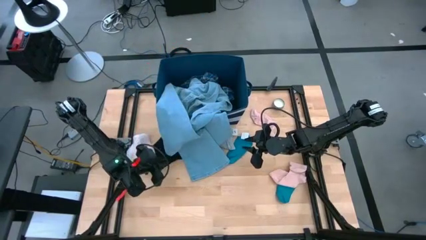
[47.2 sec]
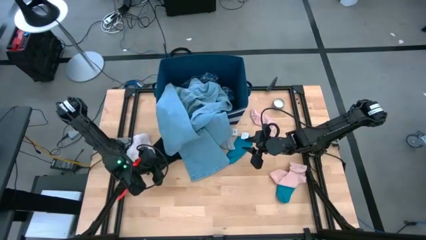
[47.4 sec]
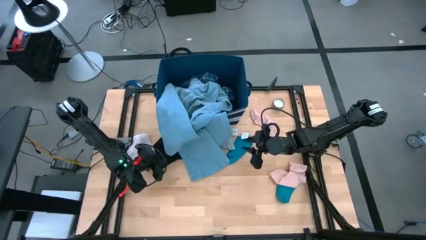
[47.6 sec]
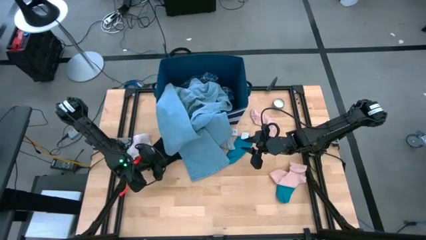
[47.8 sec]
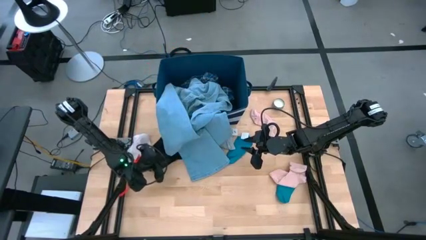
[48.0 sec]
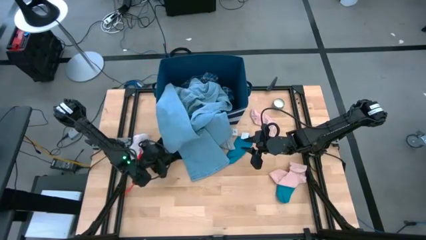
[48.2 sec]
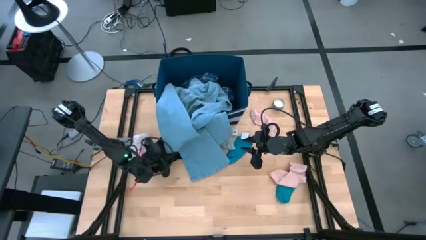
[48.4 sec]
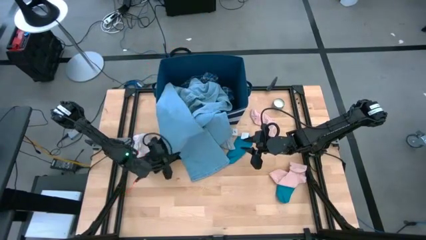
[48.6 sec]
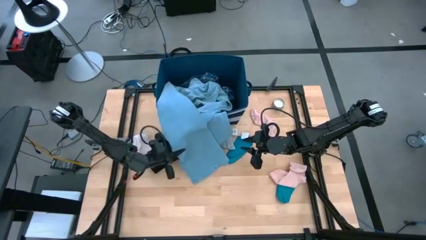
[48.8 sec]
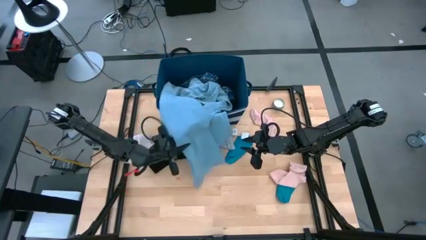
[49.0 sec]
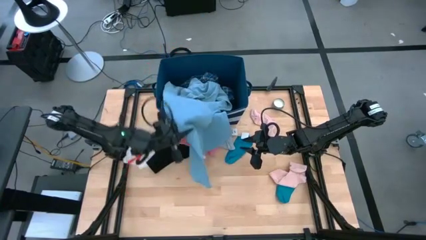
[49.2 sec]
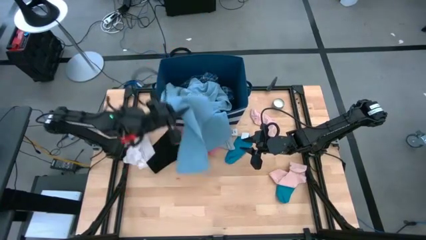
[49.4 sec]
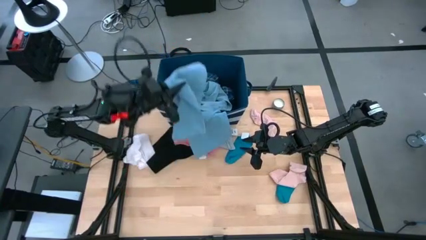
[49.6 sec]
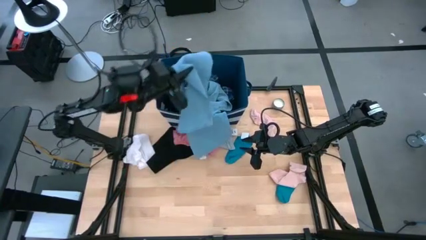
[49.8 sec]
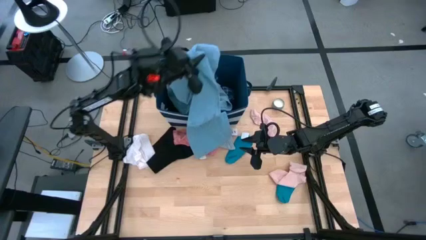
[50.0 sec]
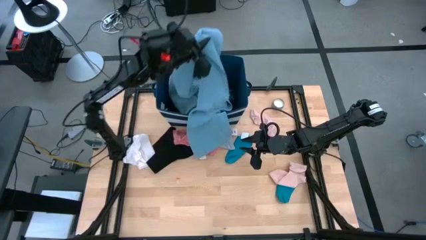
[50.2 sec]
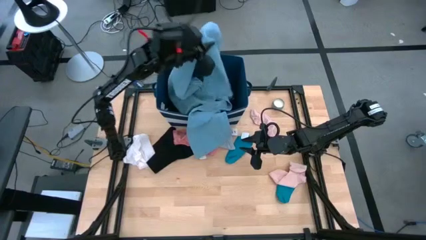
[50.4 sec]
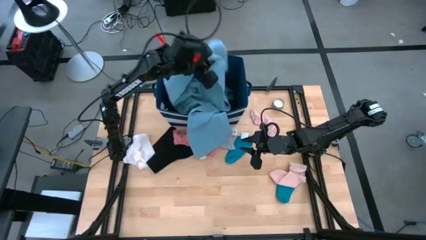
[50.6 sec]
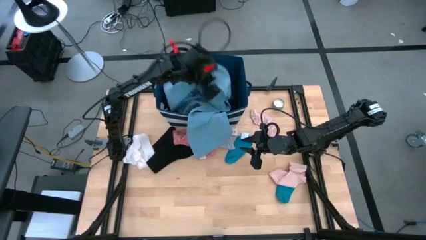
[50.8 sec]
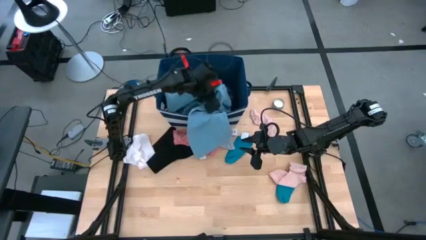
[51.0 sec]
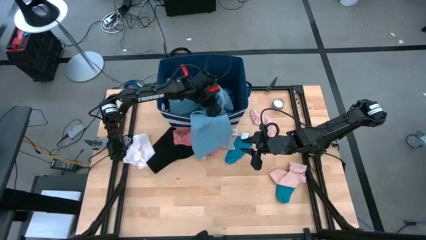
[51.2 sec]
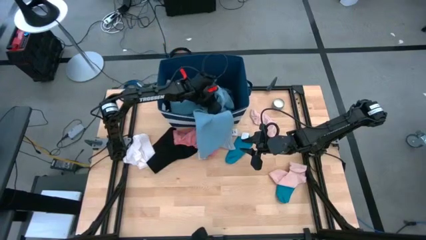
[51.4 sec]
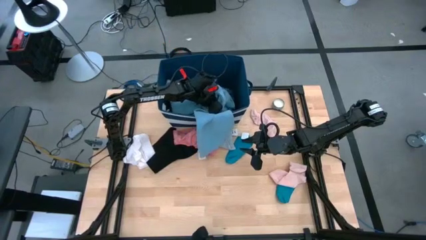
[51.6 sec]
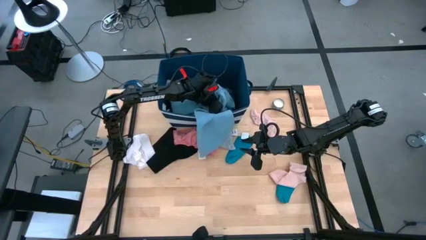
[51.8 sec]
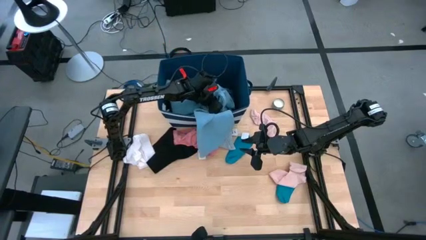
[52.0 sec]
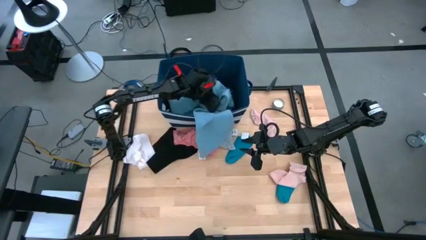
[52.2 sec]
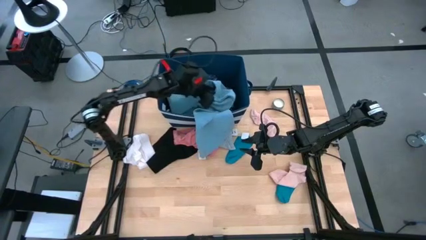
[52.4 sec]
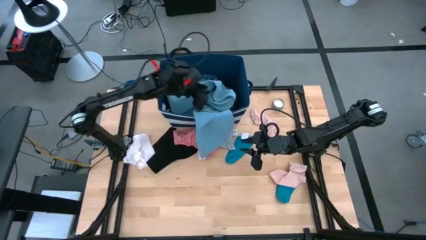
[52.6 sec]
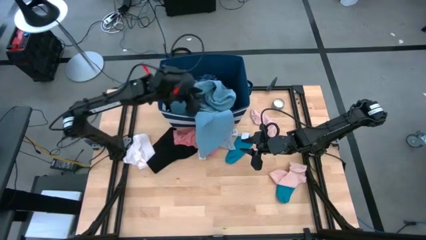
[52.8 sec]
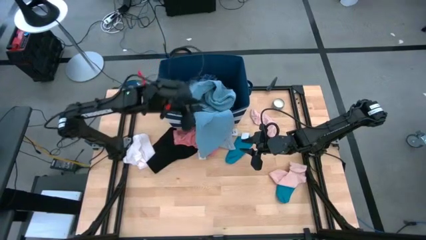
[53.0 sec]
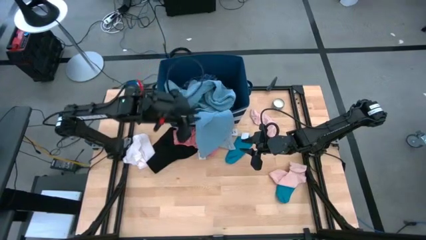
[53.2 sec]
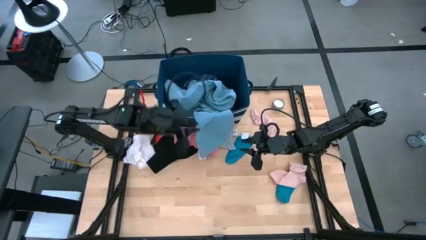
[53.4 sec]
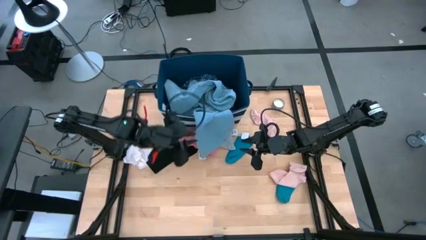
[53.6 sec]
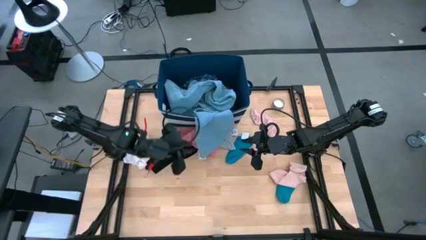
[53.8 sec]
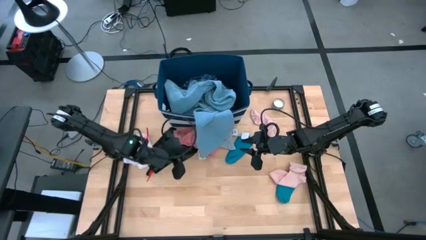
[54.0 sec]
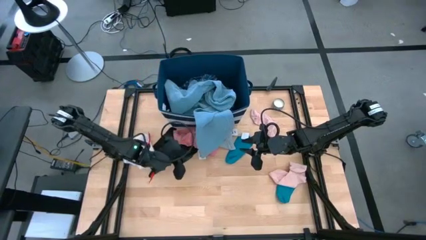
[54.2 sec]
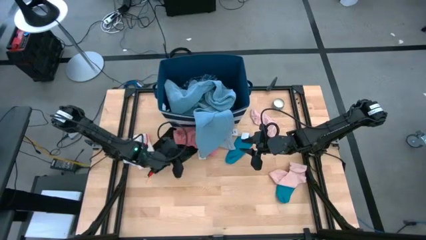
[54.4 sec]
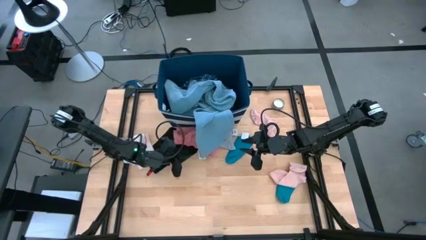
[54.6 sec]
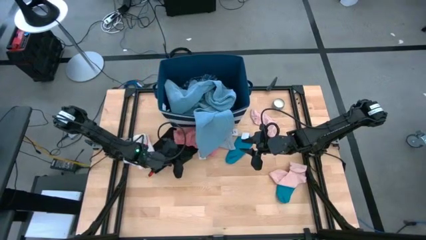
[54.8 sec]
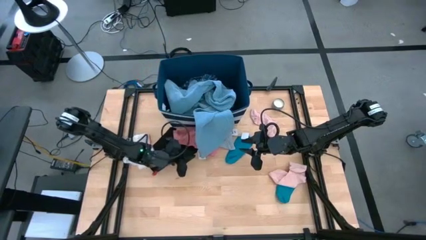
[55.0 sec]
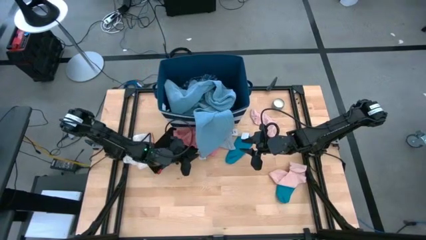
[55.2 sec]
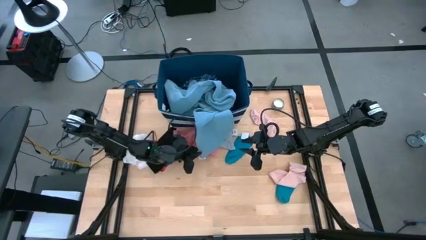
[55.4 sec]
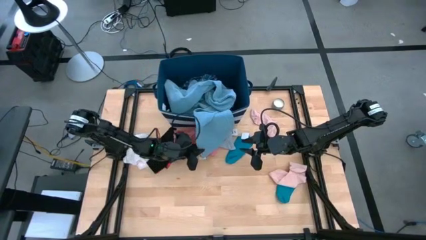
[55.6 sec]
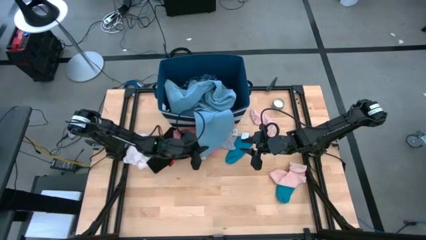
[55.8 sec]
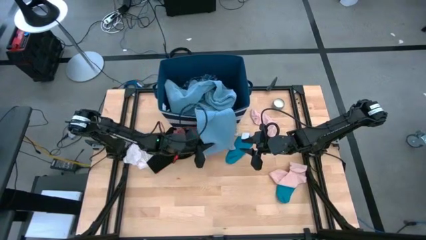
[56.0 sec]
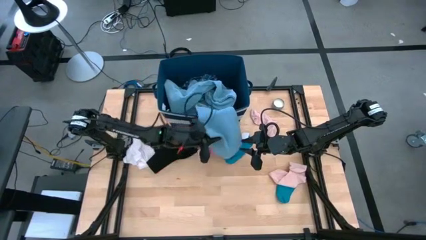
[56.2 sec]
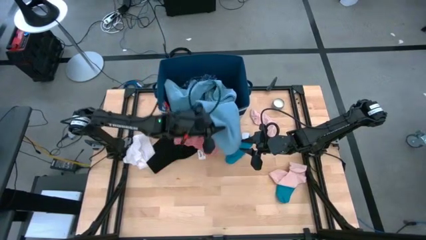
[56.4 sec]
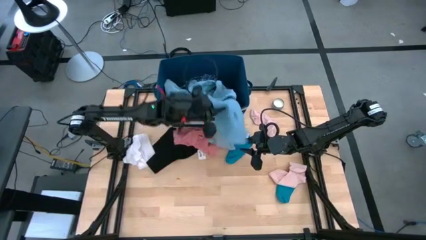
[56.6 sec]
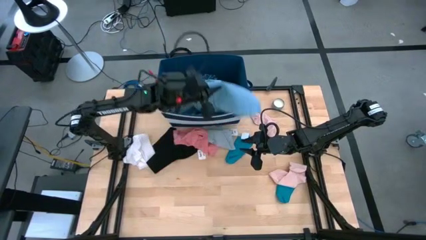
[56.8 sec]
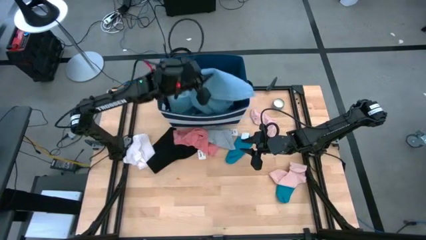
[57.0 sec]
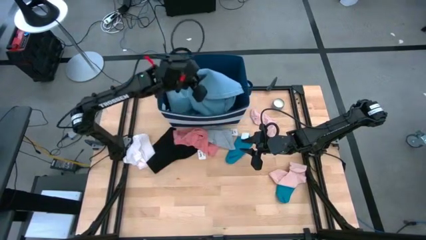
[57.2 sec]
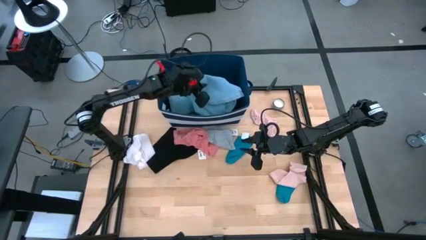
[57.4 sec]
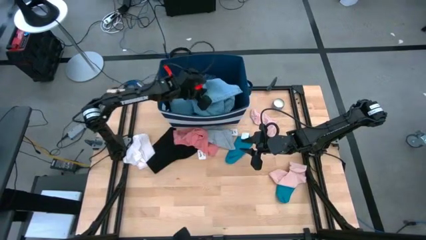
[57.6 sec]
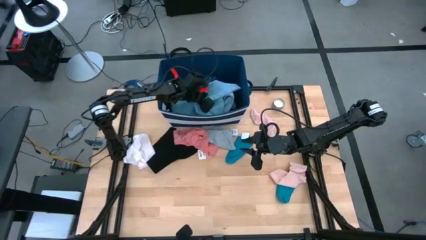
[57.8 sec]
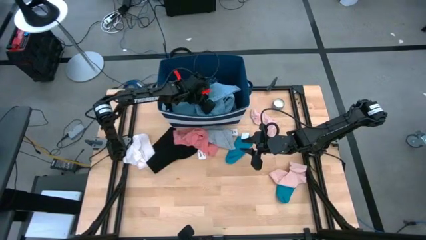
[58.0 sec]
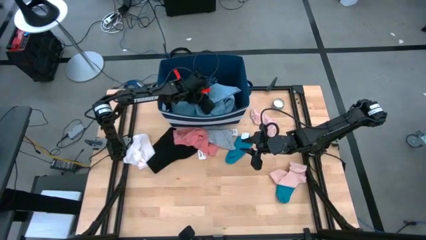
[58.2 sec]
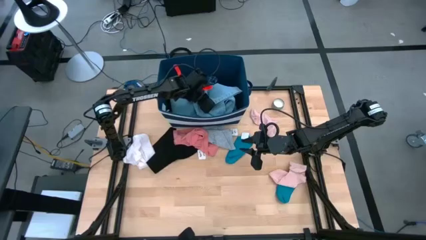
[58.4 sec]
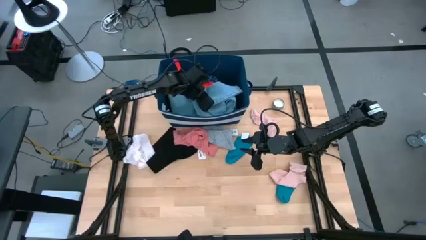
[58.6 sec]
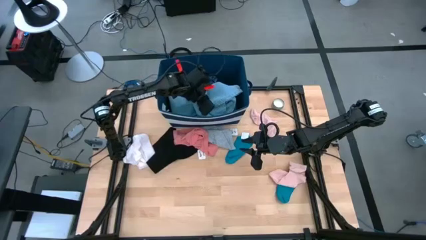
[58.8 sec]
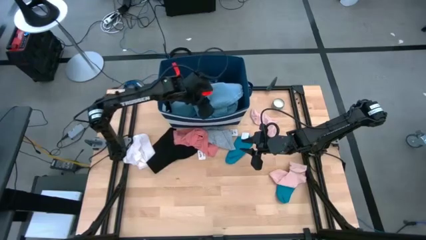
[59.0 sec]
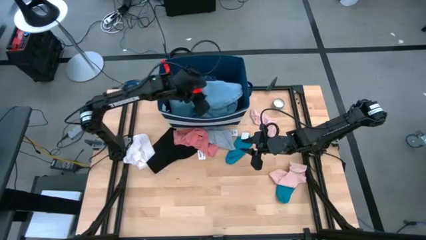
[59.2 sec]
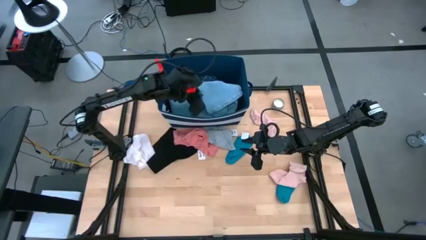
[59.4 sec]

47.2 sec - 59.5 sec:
Task: Sort clothes
Put the blue jeans into the blue bin

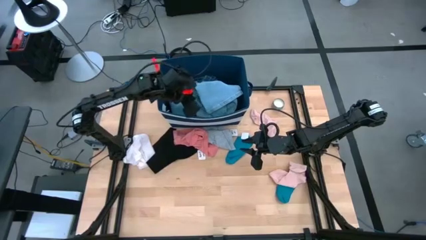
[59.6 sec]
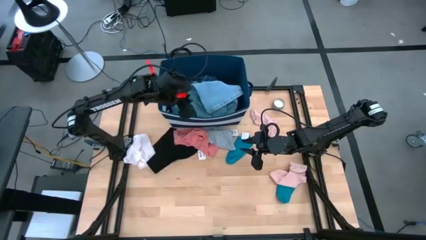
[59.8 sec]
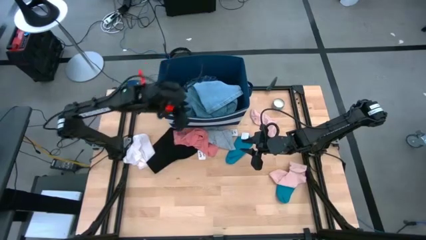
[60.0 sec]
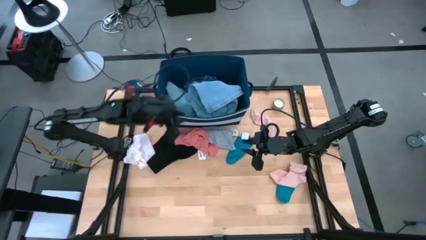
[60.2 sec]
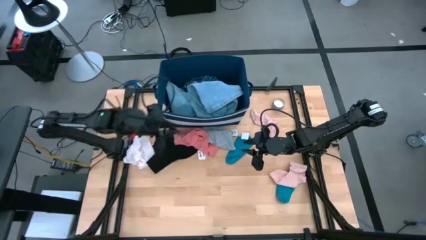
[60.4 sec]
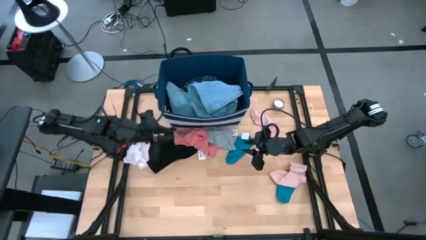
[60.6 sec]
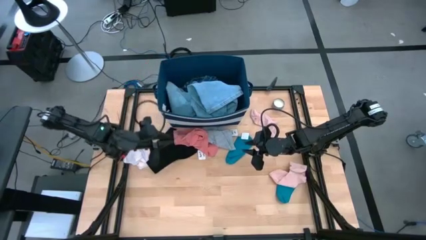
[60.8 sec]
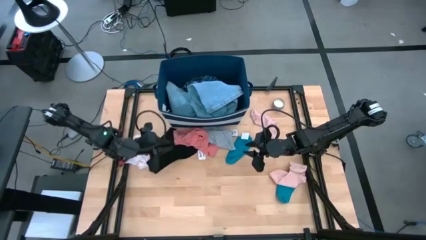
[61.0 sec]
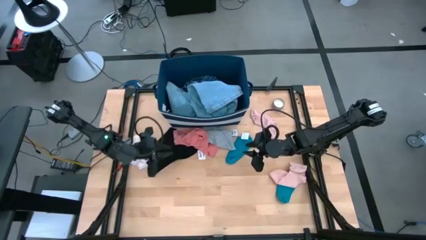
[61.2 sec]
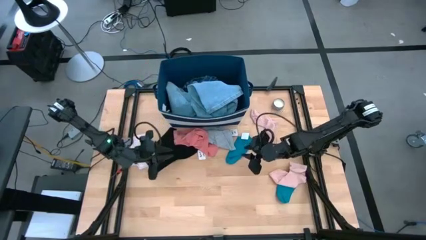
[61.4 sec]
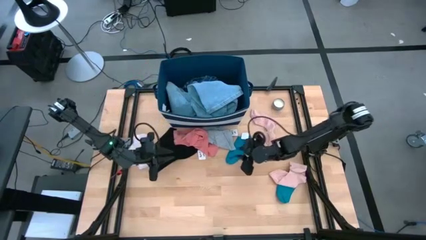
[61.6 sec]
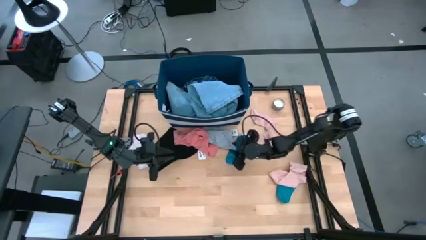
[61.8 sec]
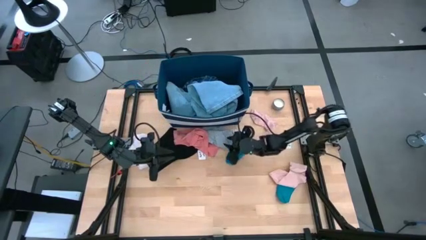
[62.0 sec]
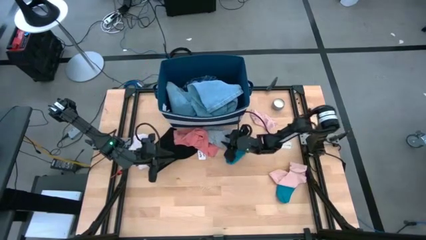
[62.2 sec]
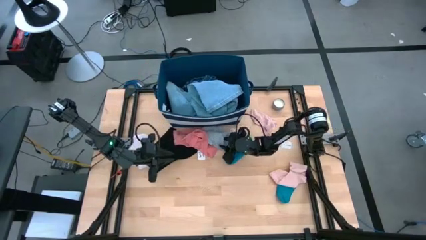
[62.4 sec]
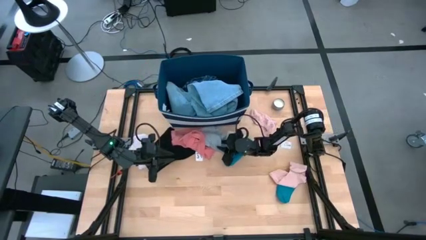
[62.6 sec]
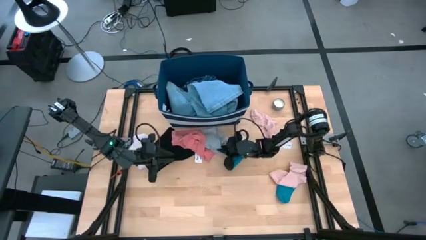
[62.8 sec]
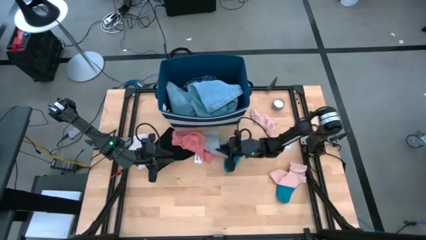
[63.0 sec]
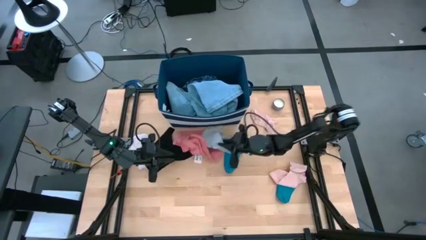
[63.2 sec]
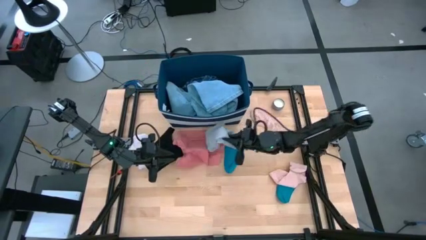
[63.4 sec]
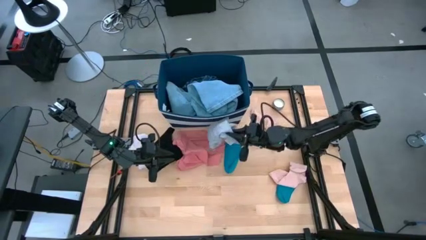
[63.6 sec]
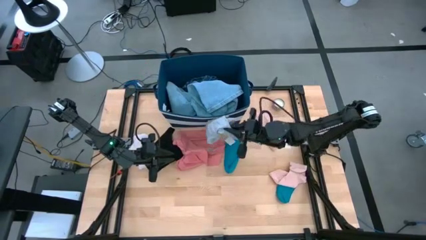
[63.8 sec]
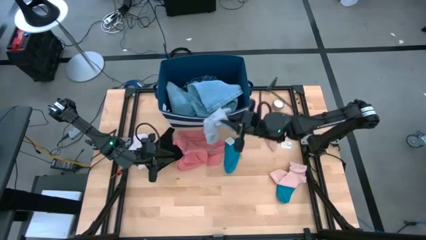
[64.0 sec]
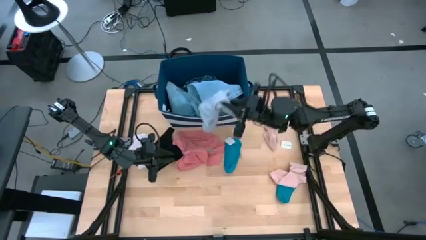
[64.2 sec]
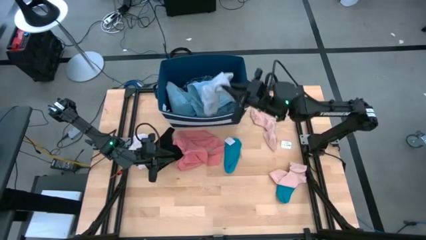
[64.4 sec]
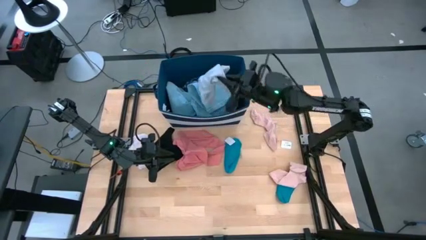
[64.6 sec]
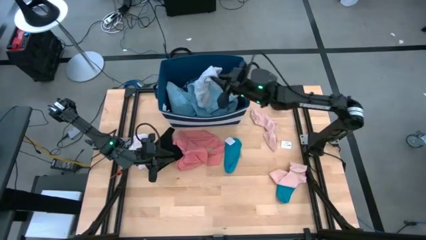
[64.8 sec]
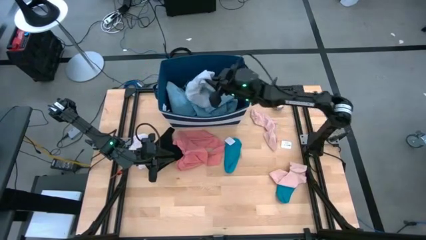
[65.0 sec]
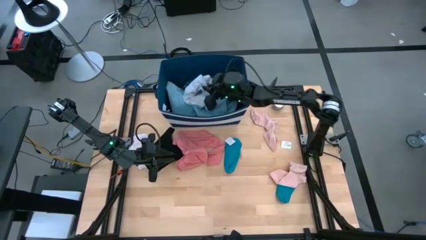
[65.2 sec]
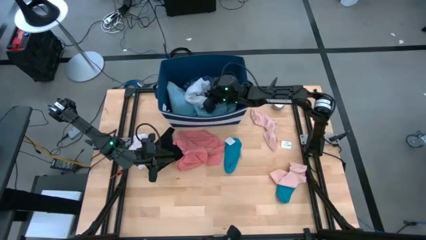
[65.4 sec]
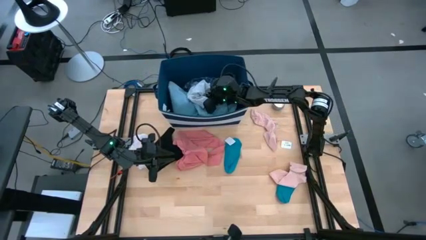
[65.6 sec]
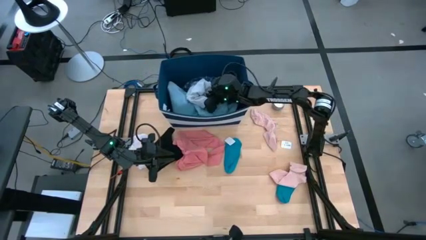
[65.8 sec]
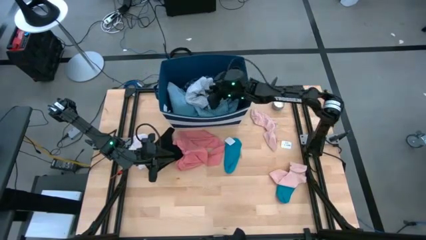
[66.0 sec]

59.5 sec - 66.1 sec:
Put the gray underwear into the blue bin
